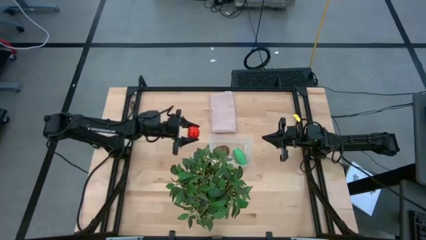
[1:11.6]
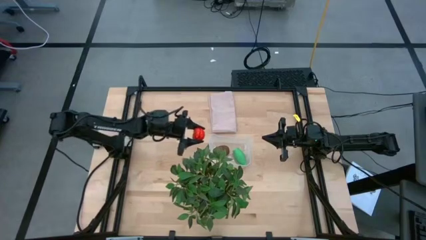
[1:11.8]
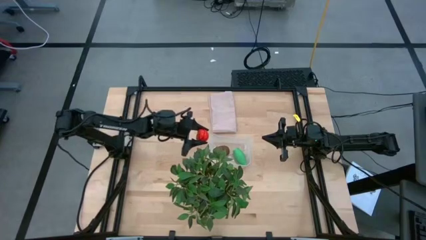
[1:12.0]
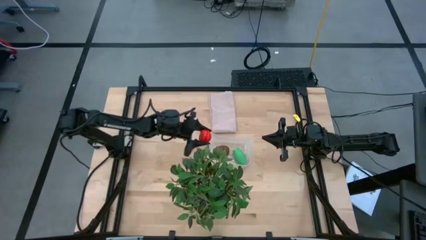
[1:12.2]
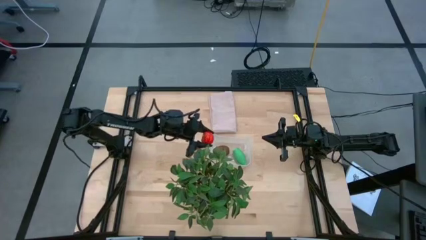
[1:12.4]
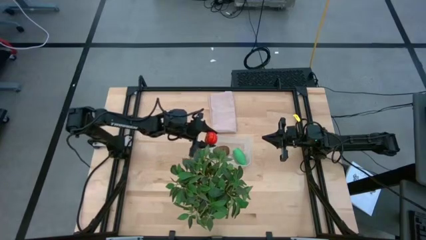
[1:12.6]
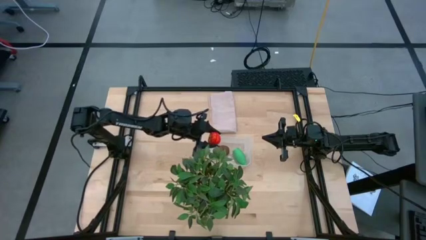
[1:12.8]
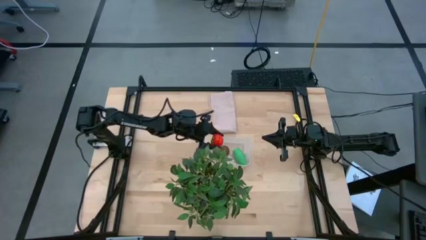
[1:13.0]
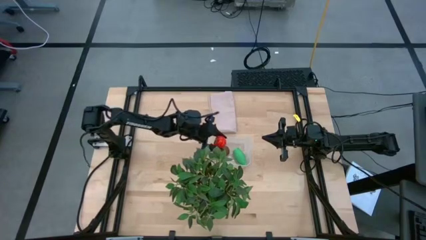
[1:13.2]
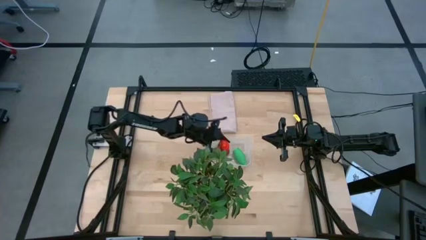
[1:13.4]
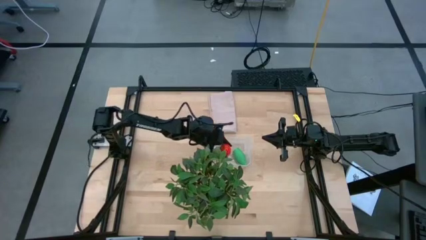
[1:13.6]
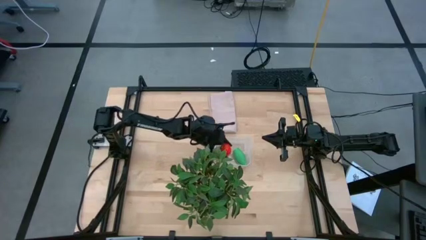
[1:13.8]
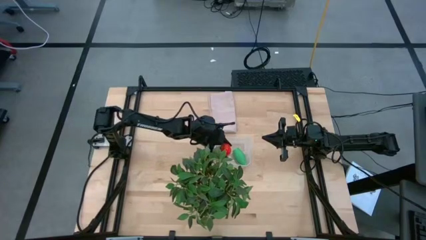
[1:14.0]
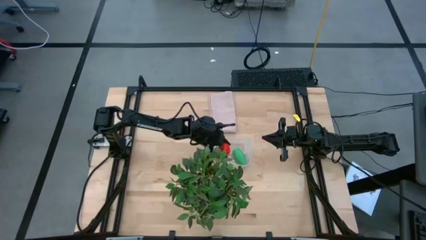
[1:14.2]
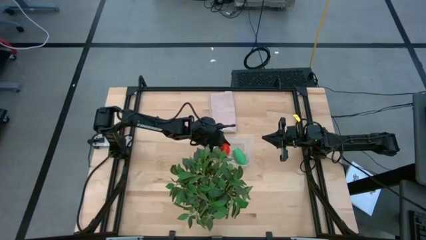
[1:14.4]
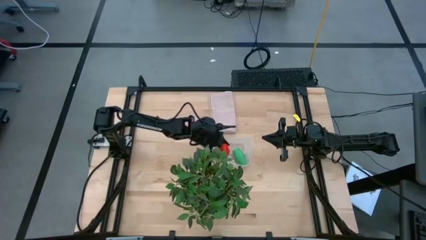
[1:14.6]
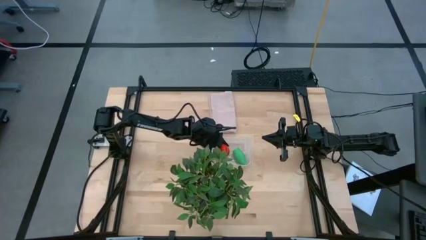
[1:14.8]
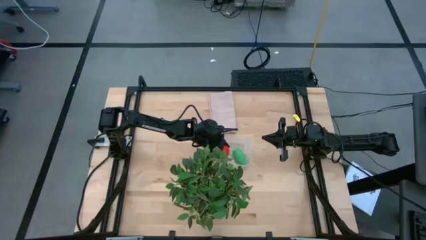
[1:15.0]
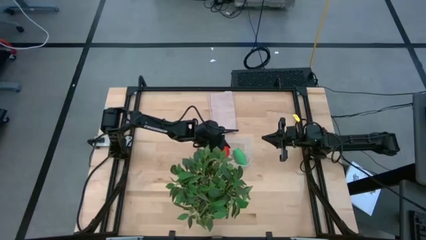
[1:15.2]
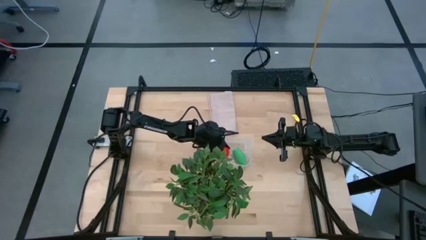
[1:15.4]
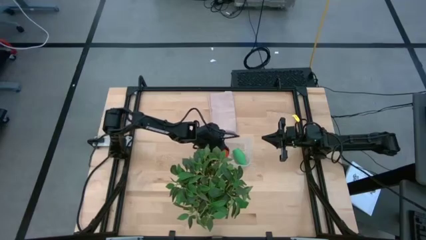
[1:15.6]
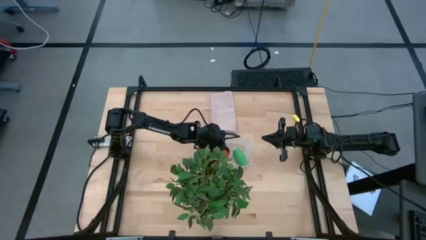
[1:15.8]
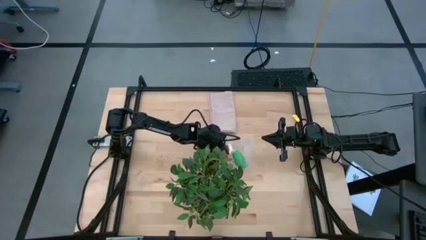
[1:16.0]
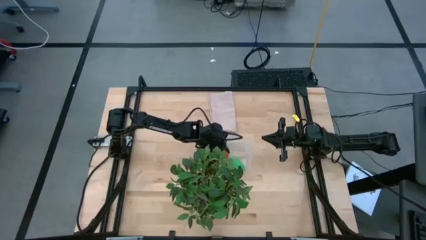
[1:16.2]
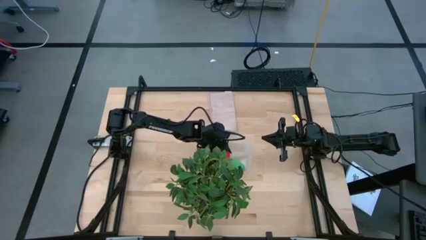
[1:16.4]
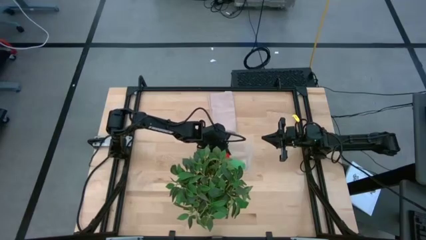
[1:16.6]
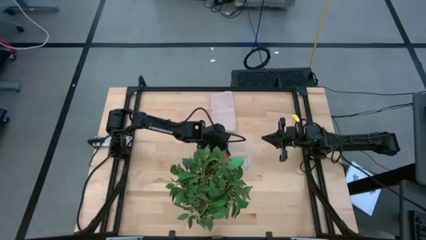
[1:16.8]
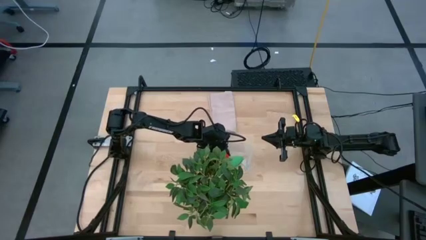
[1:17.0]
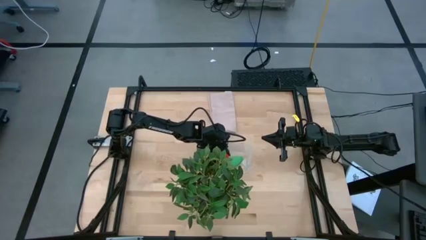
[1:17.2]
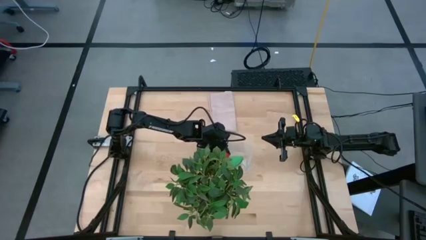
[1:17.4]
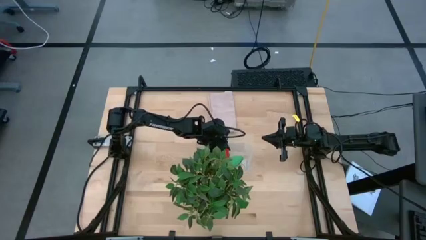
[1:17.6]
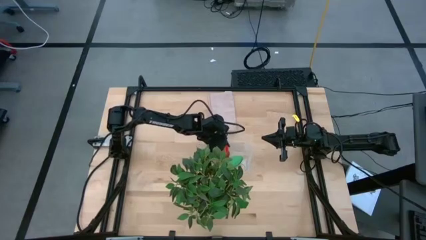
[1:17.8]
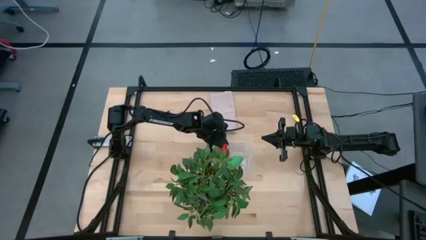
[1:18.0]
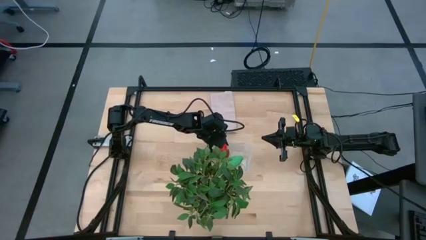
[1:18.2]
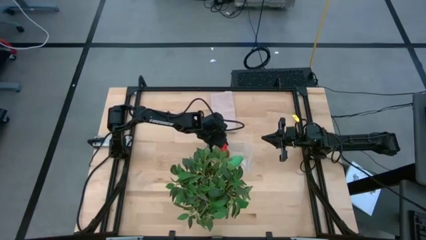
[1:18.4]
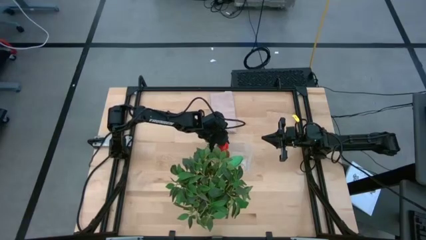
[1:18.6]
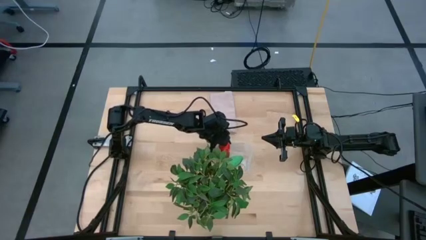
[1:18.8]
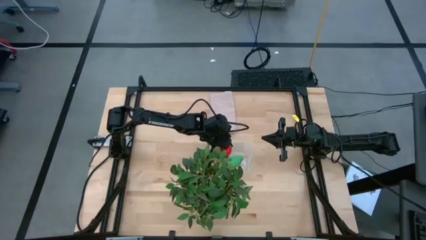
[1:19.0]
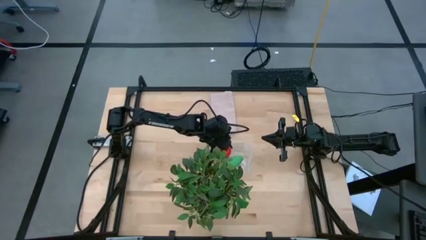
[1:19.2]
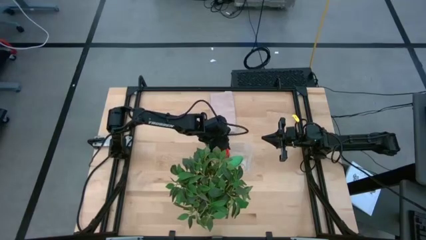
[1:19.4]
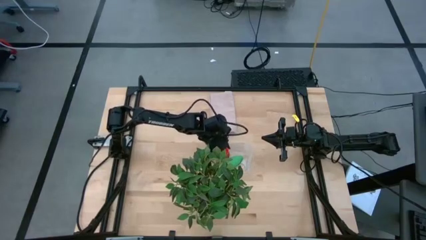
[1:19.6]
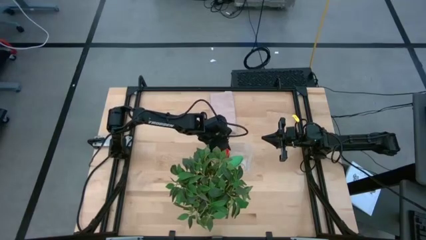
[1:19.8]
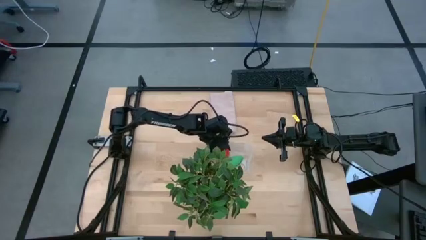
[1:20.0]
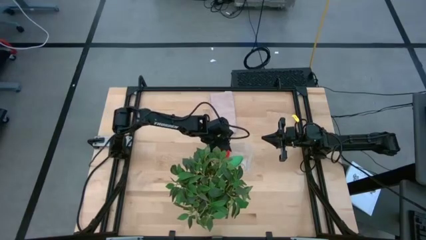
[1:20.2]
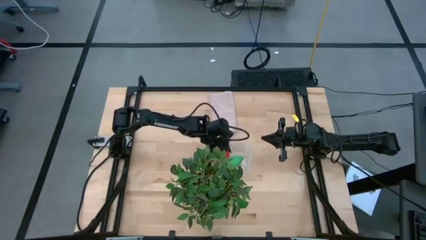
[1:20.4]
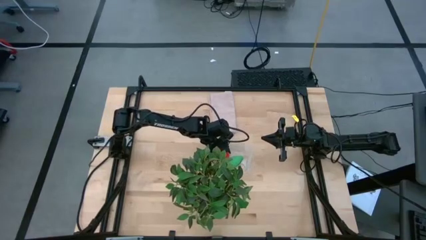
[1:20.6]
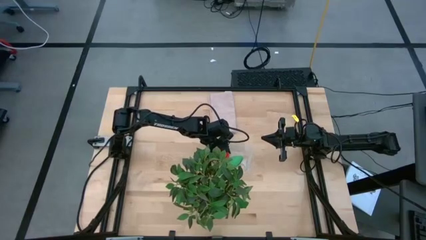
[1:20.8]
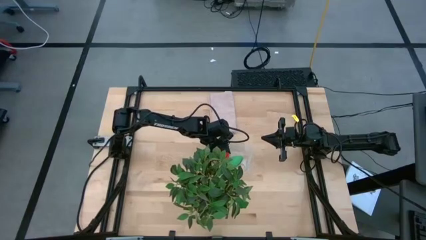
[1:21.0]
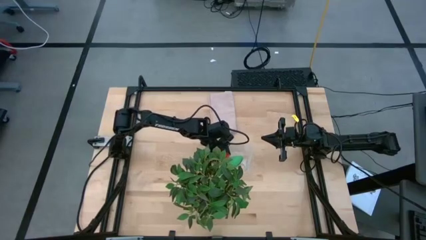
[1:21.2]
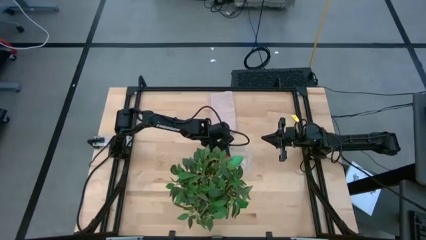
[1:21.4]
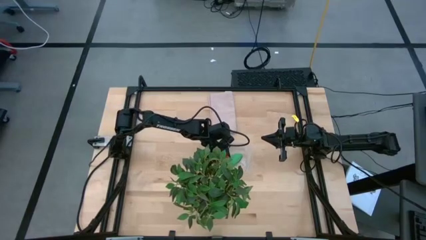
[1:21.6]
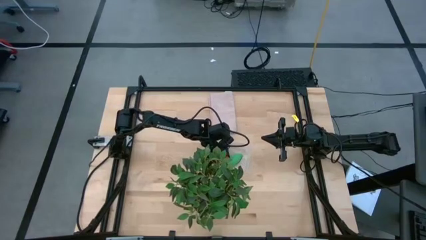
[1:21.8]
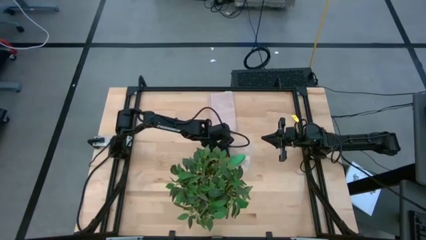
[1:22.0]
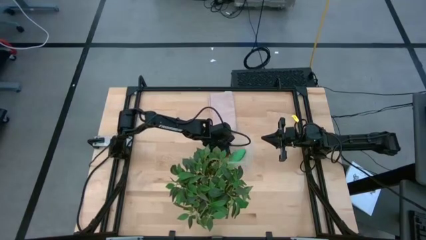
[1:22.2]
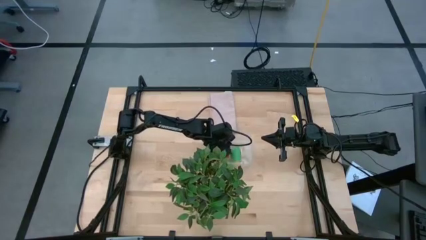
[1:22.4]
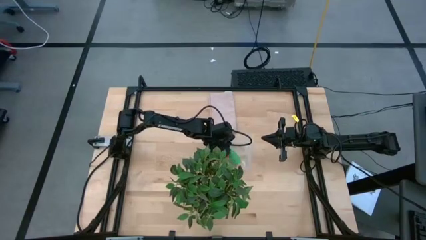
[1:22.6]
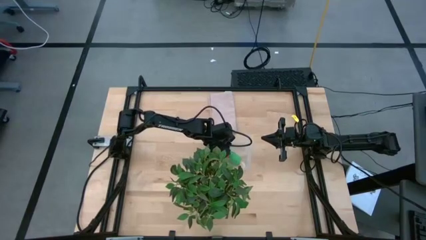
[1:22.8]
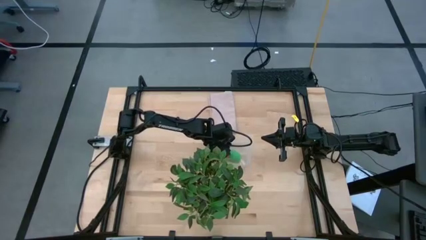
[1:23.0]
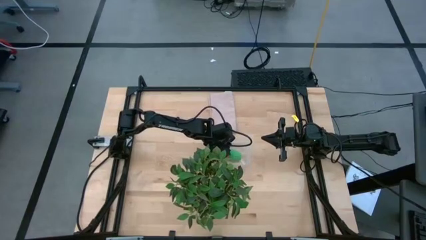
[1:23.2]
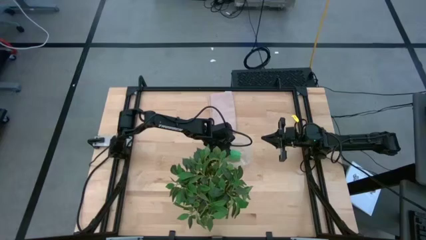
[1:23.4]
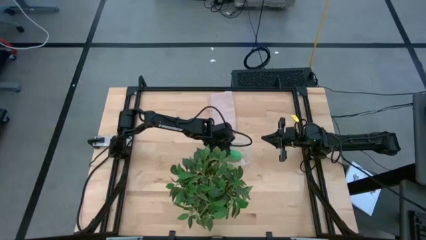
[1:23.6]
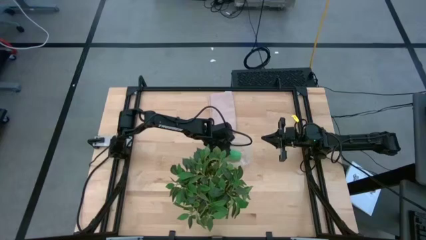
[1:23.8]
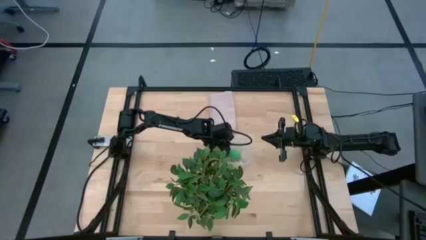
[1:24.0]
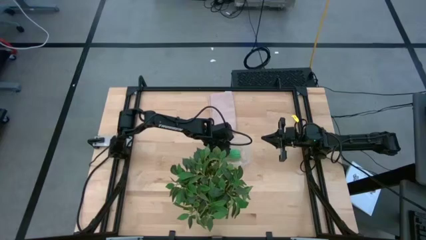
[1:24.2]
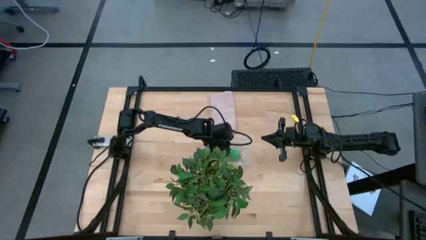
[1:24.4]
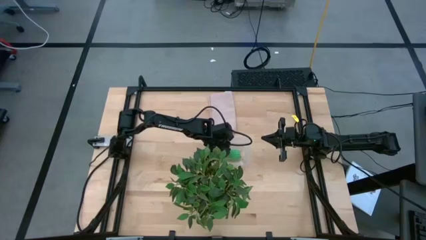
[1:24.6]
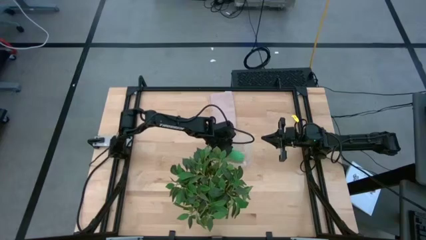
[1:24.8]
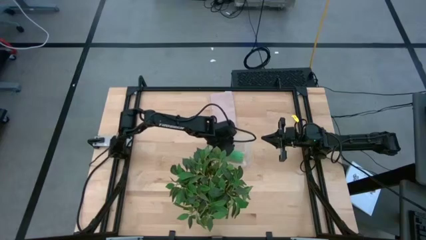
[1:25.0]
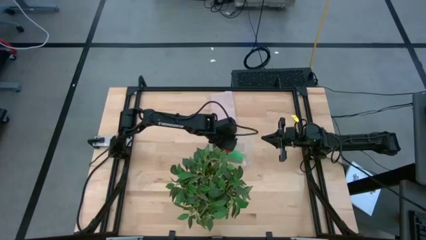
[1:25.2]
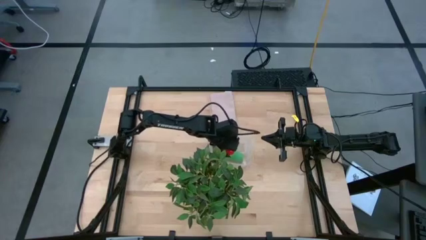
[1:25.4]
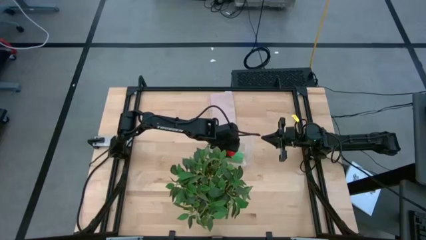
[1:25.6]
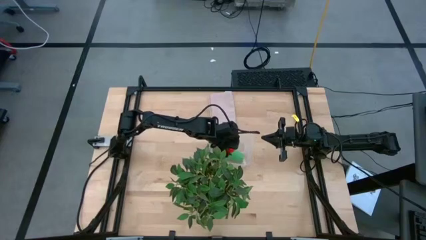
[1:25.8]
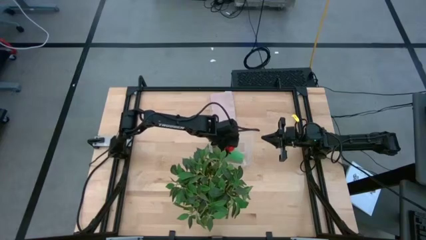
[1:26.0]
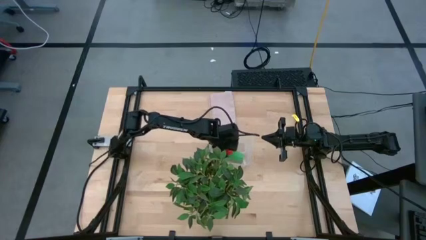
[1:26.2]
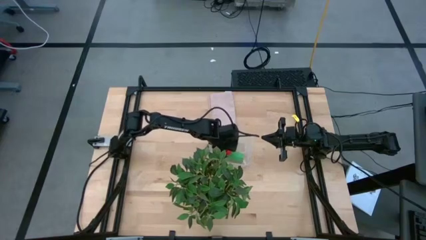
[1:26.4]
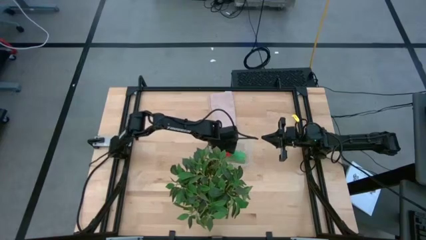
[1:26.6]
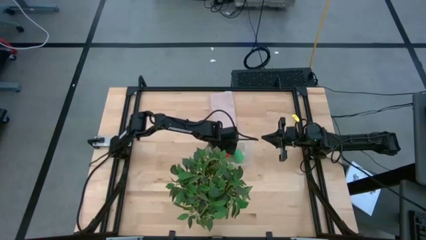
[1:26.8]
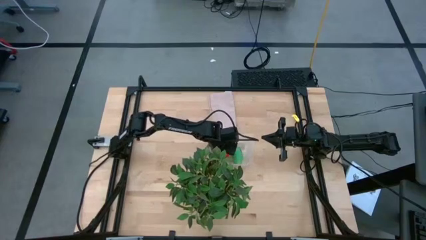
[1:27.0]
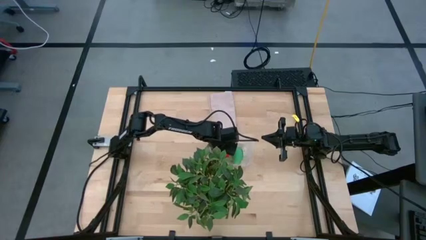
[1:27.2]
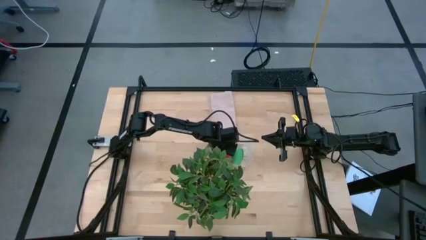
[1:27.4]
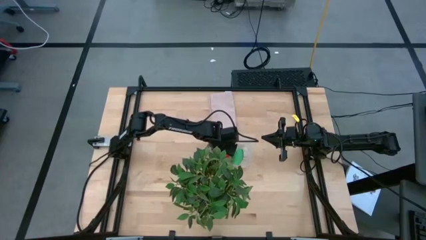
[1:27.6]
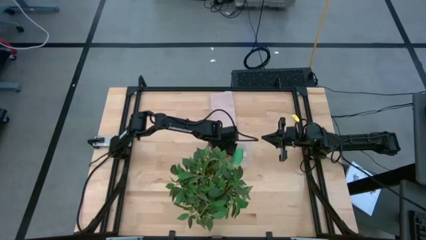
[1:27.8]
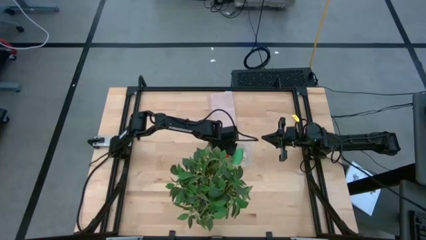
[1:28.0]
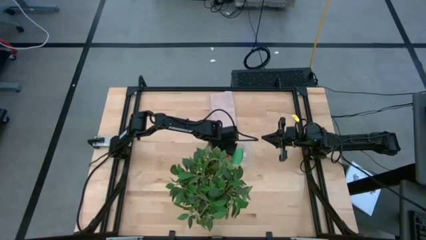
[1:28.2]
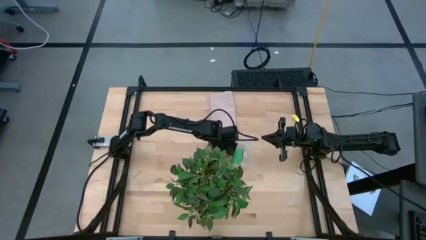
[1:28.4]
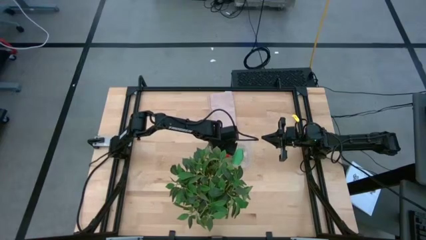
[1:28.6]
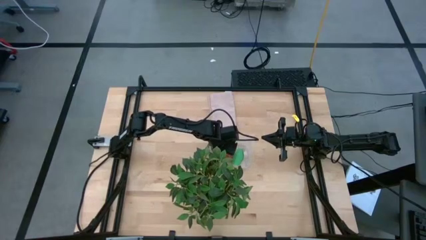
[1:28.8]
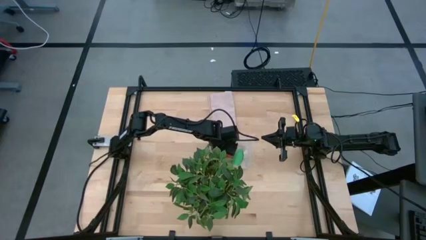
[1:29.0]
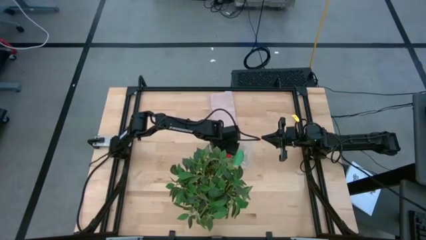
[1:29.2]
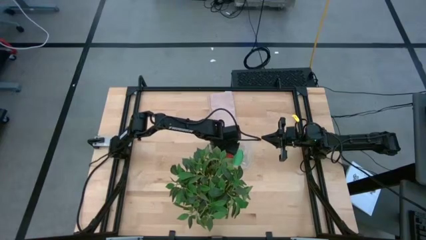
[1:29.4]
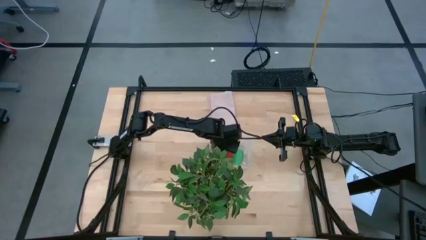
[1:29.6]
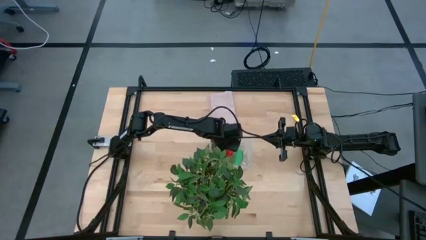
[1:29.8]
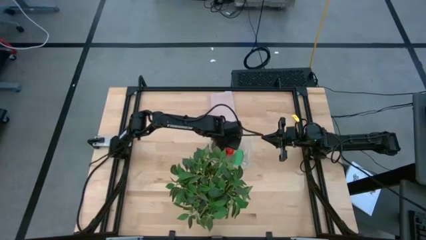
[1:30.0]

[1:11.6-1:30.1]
Task: Pick and placing Produce into tupperware
Put the tomato into the transparent bin
